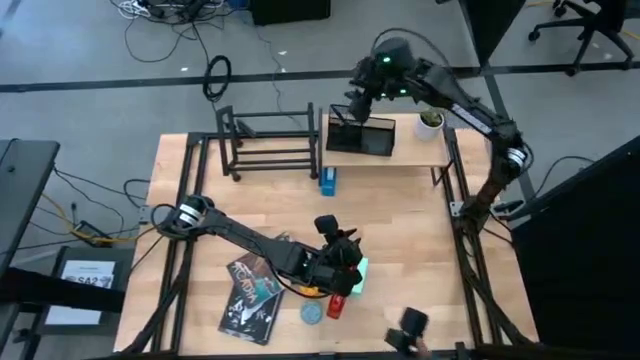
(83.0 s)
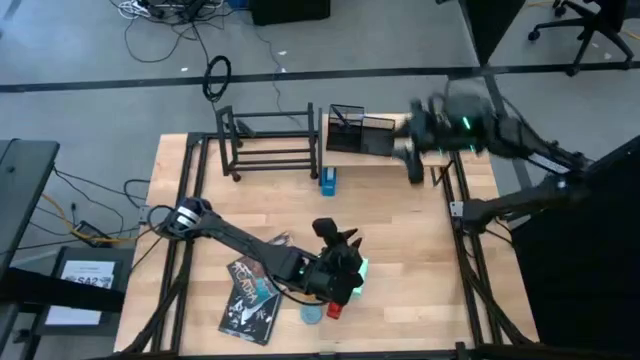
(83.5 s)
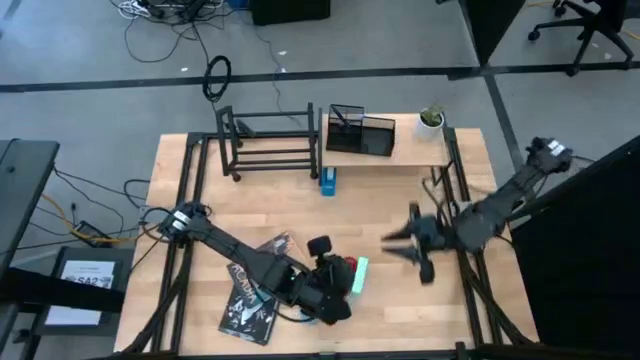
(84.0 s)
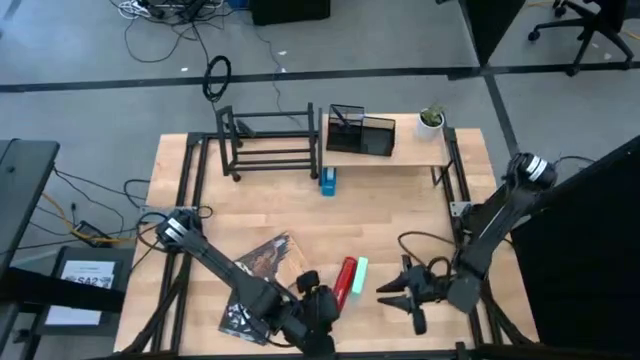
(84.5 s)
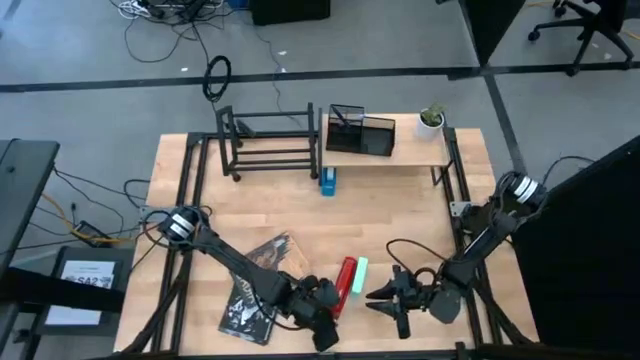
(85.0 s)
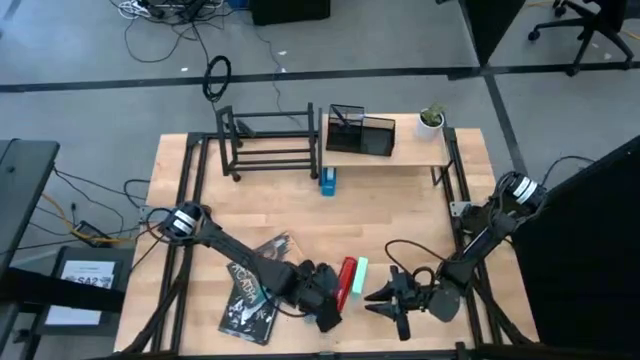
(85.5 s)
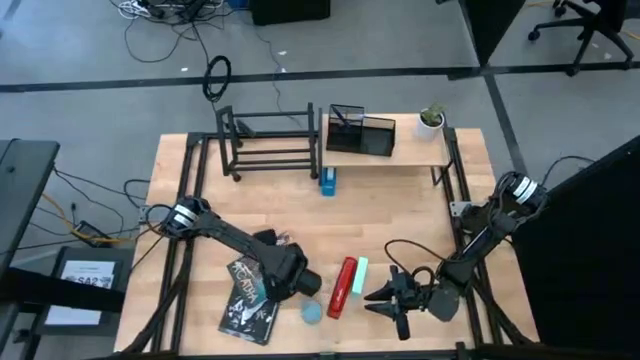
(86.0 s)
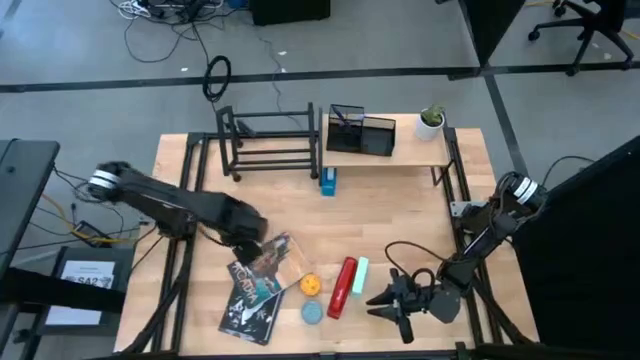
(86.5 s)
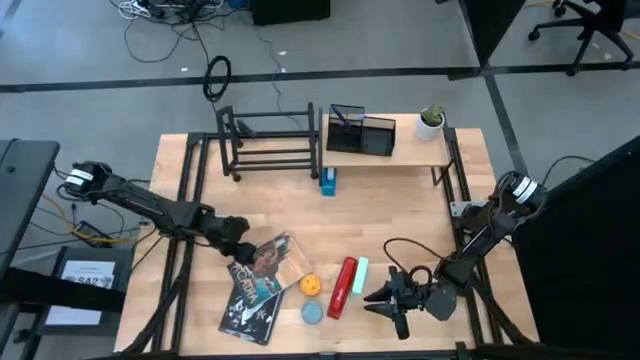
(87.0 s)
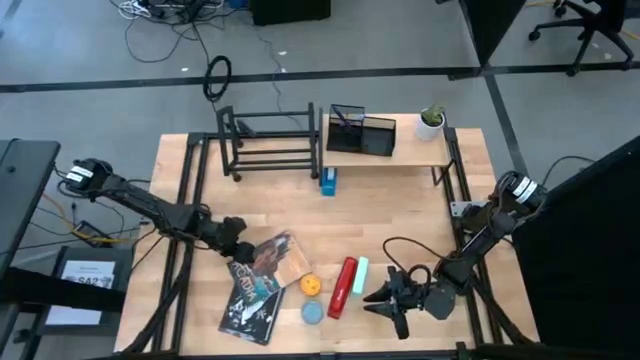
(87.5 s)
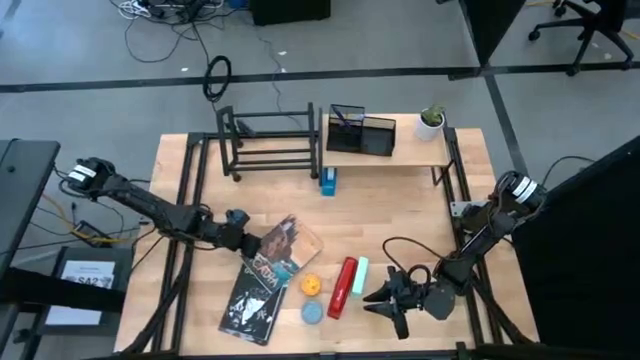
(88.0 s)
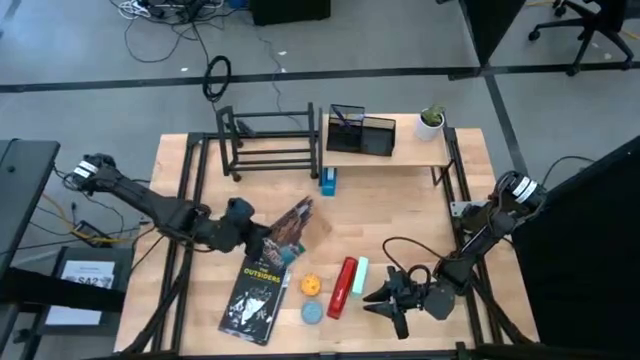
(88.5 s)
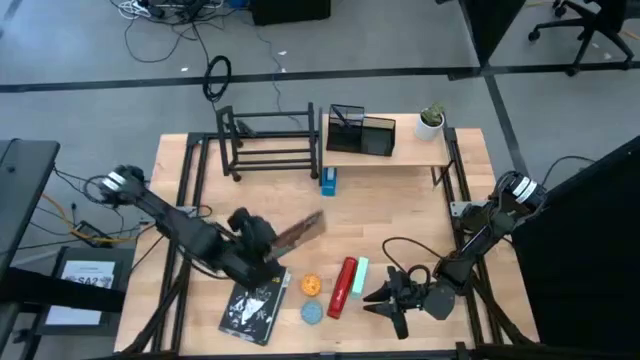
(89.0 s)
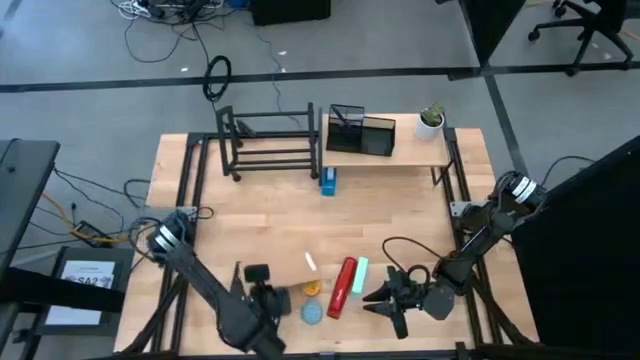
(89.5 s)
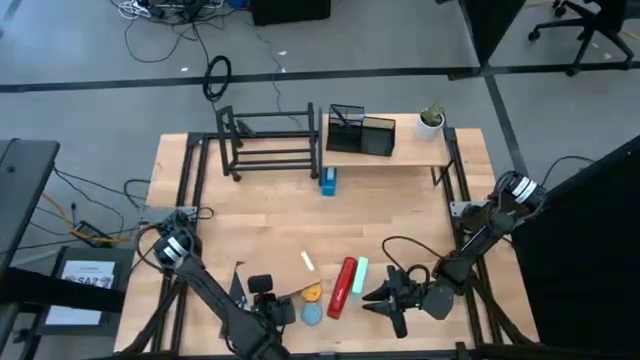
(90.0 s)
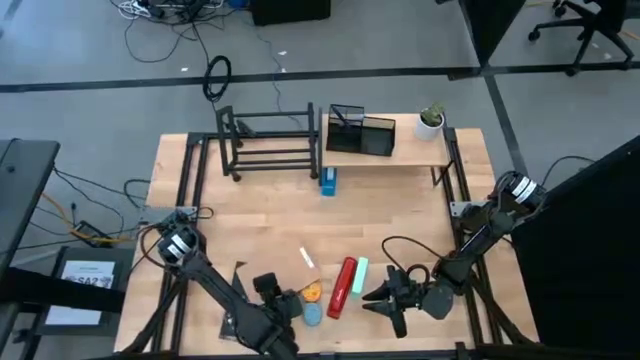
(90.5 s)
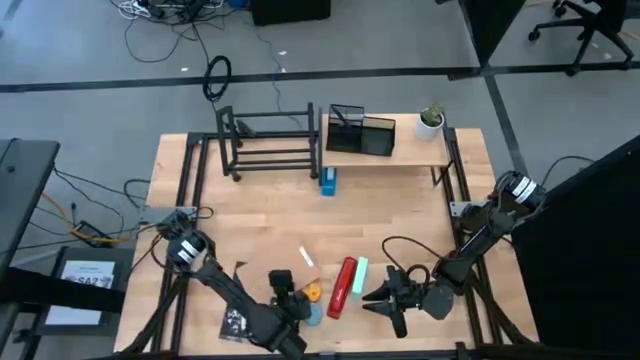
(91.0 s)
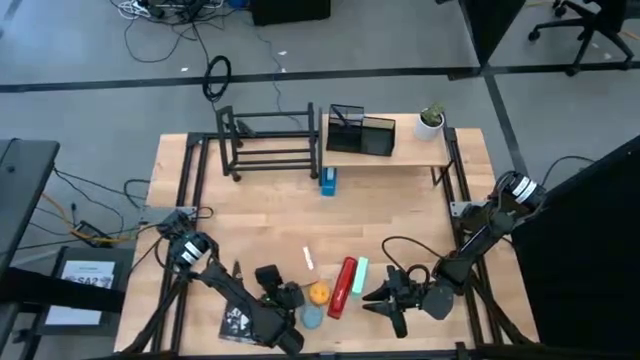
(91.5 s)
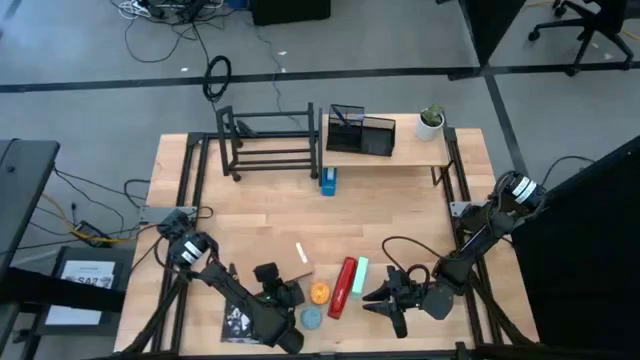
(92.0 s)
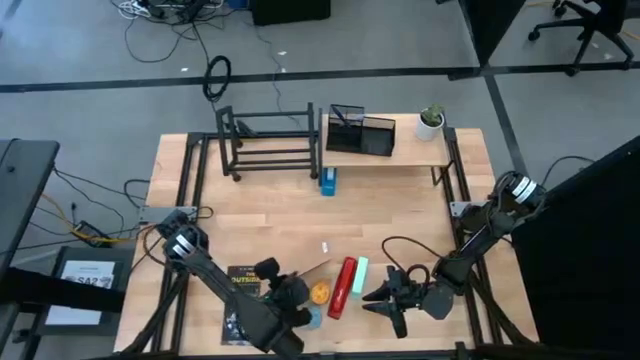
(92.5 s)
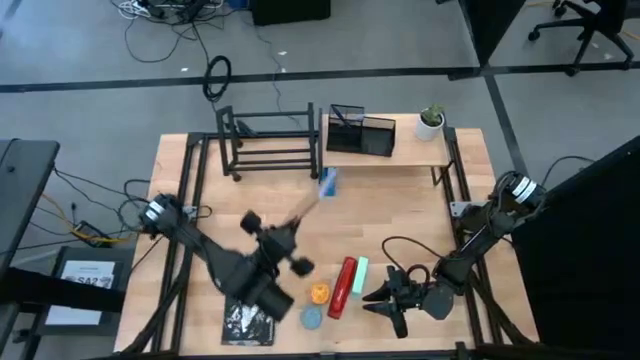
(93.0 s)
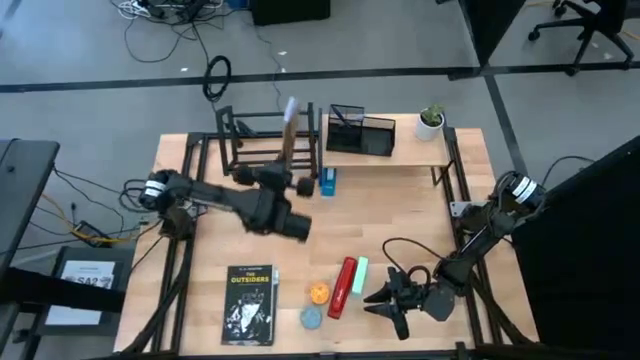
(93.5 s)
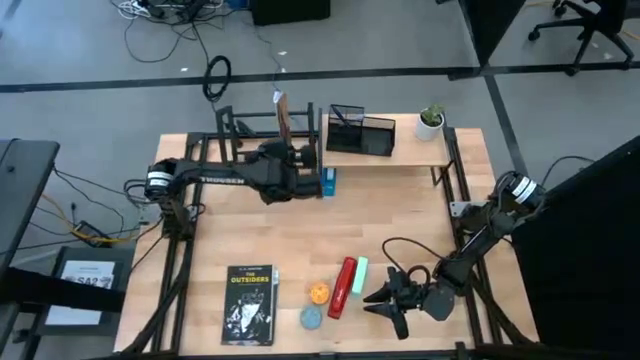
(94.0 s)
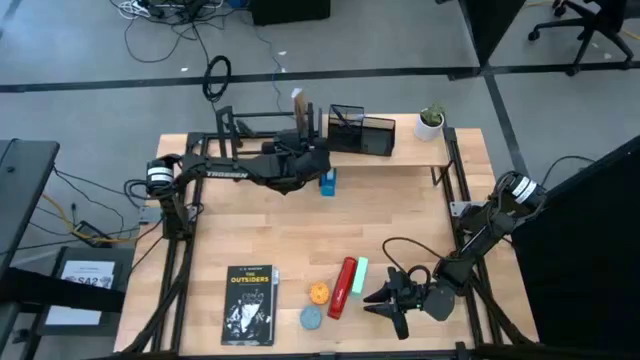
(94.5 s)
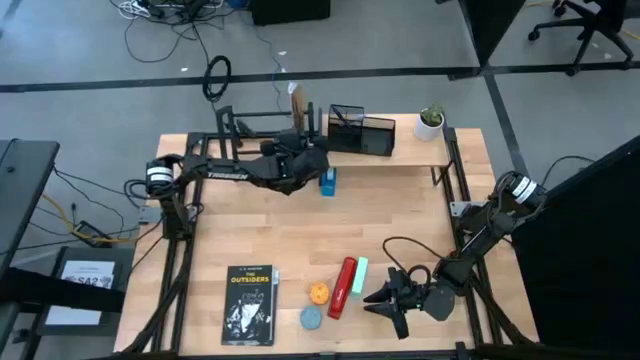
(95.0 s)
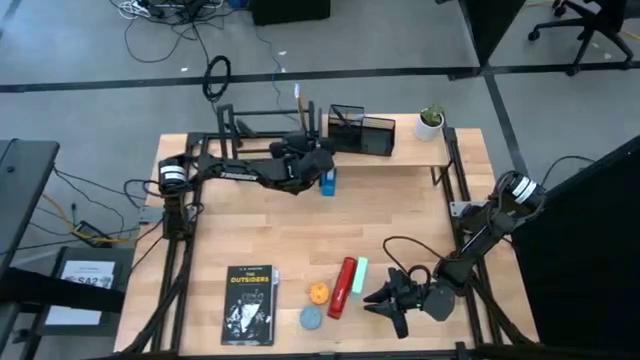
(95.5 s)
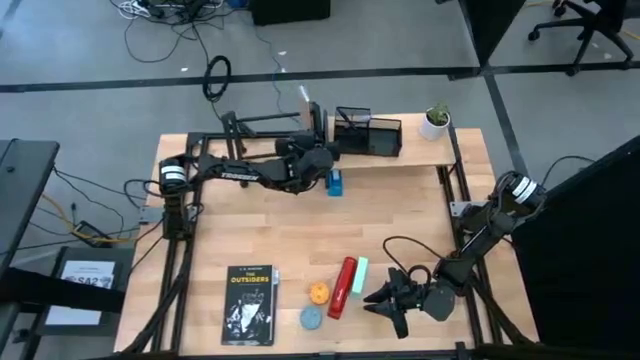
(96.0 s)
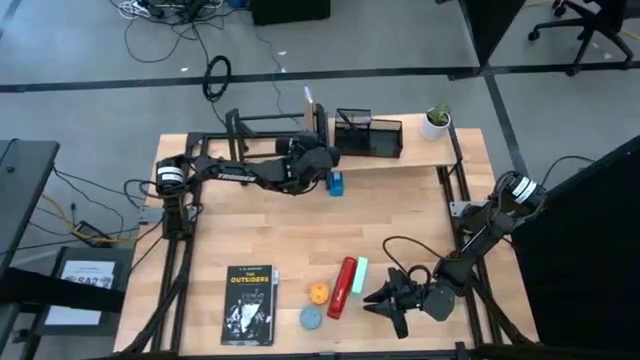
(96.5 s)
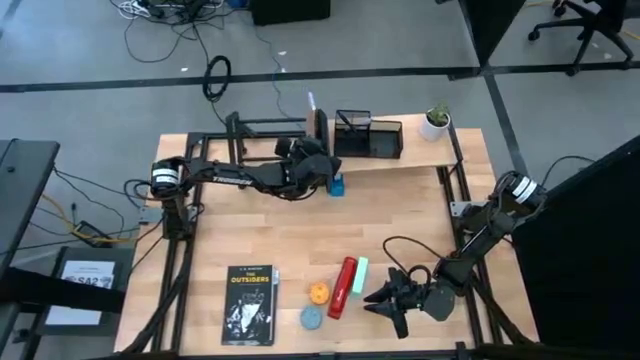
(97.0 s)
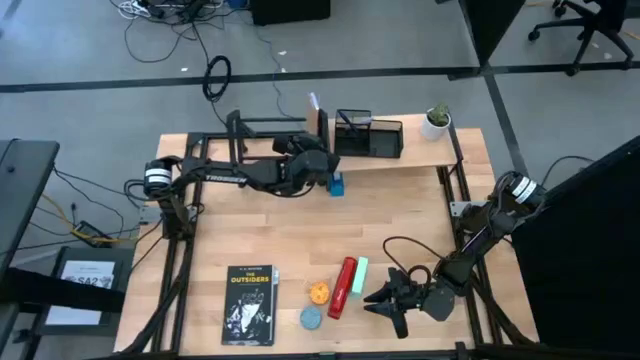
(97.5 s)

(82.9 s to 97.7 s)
Task: Stock shelves
Put the brown book on the book shelf

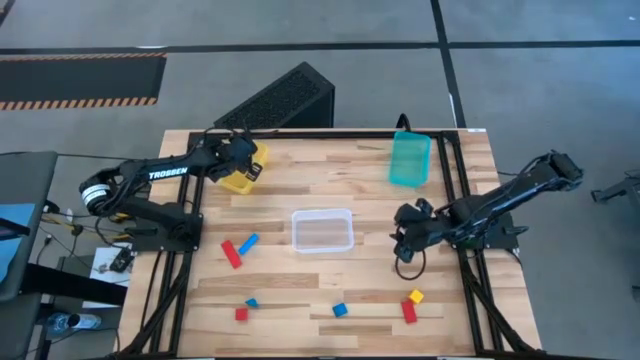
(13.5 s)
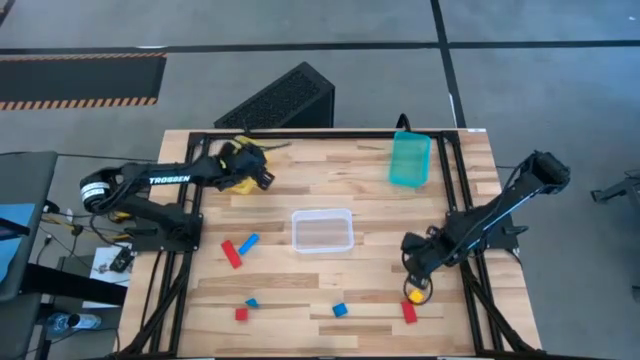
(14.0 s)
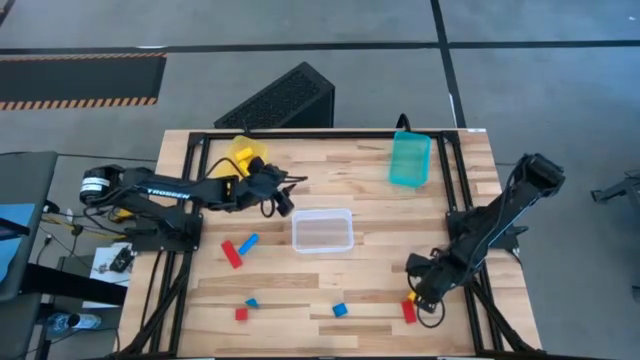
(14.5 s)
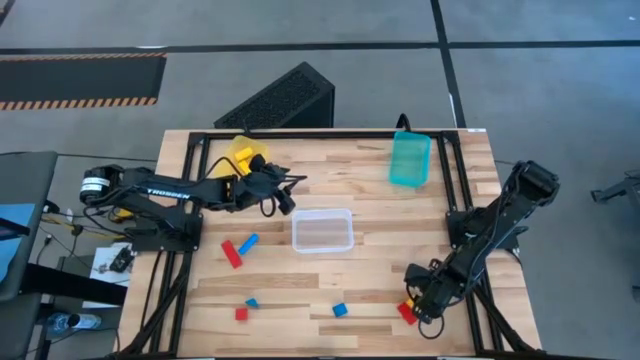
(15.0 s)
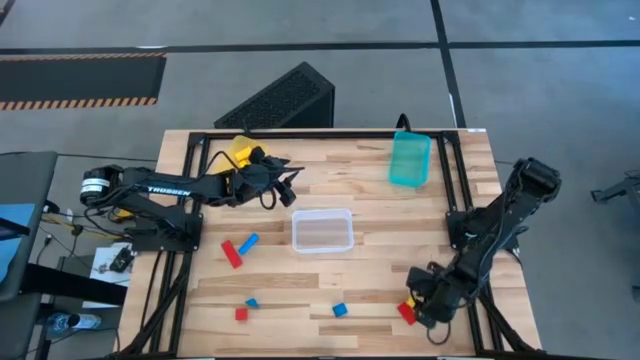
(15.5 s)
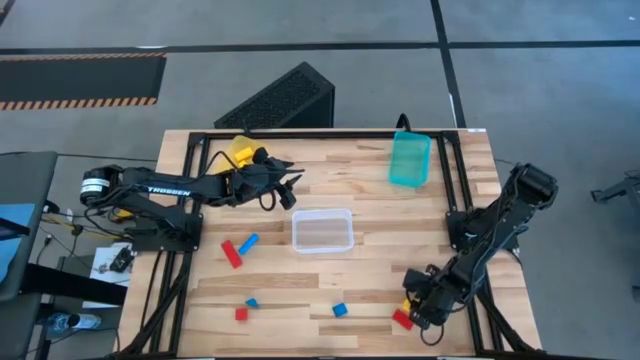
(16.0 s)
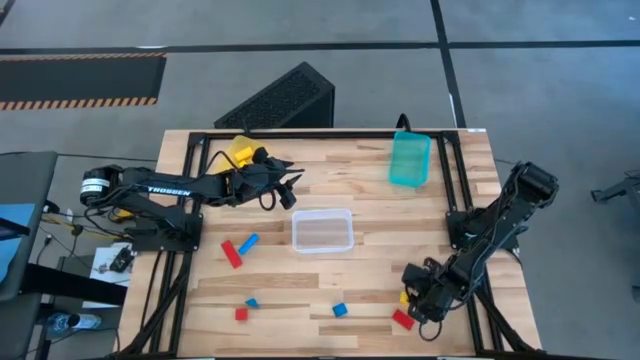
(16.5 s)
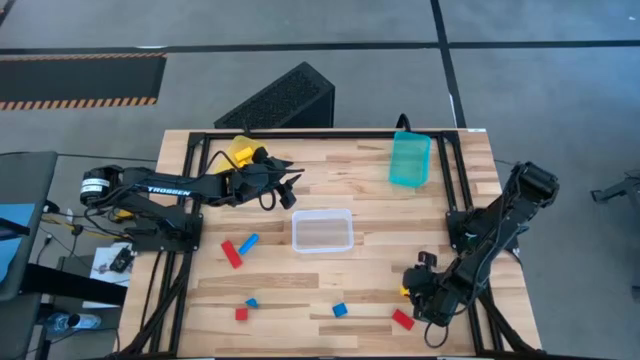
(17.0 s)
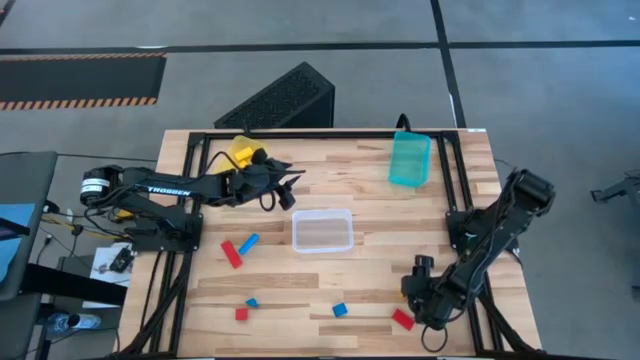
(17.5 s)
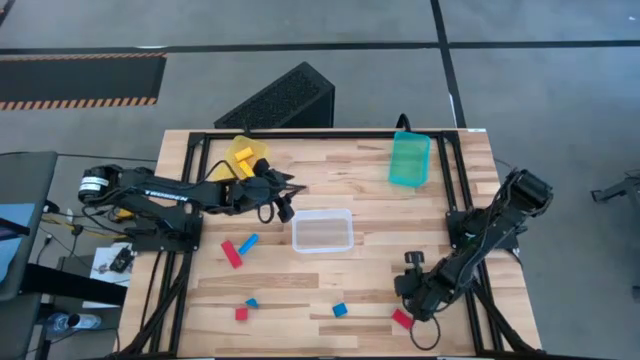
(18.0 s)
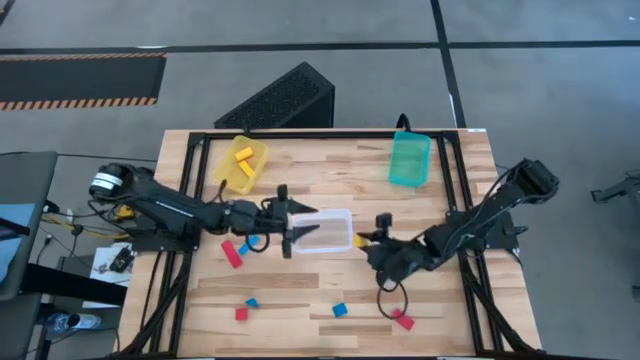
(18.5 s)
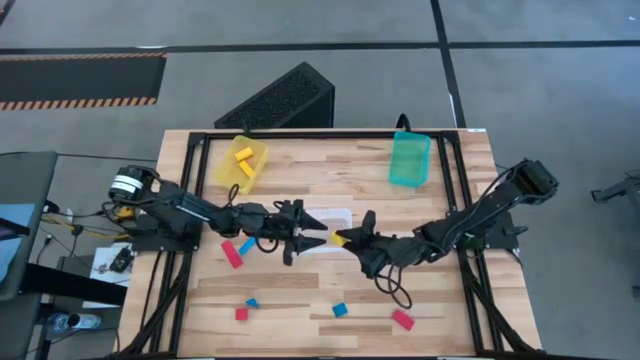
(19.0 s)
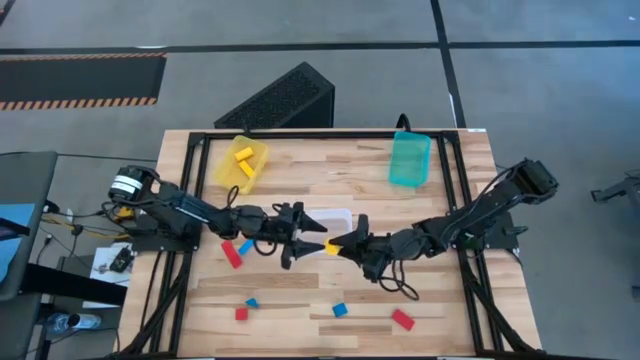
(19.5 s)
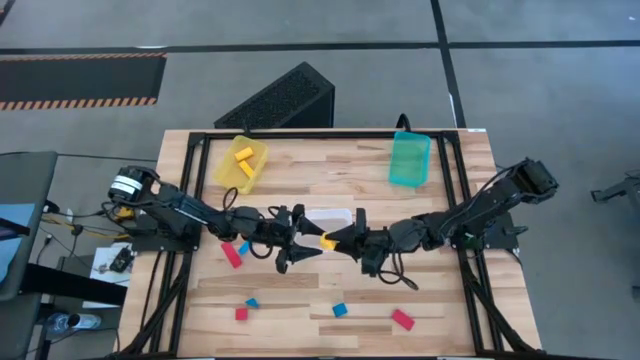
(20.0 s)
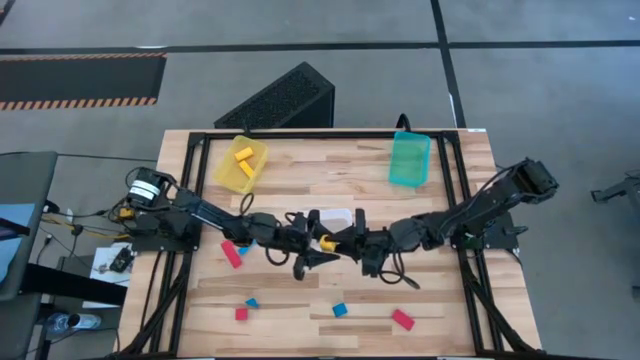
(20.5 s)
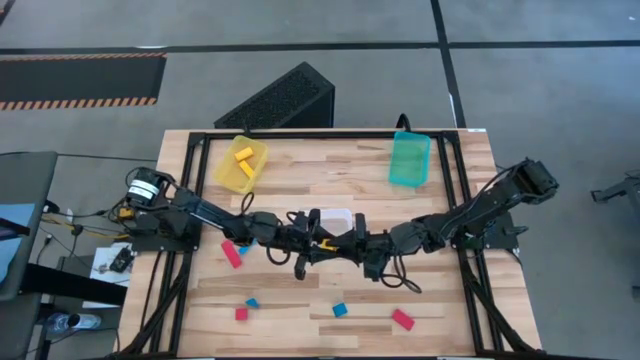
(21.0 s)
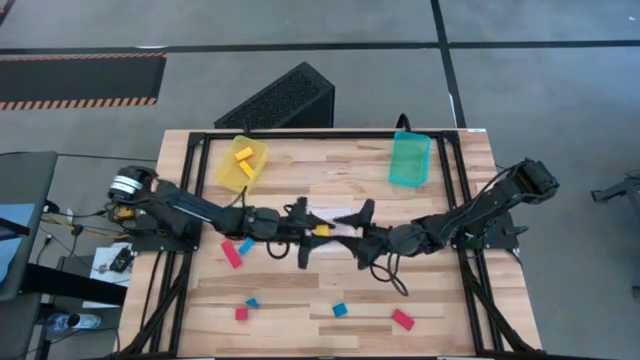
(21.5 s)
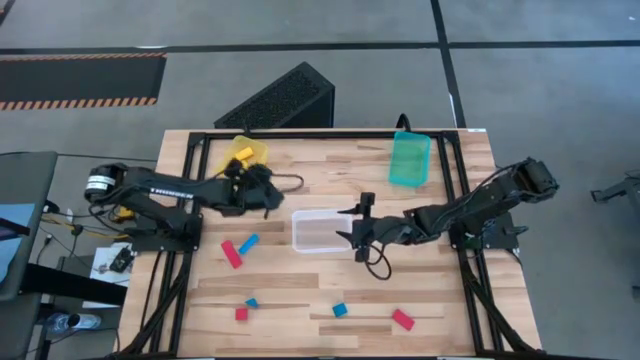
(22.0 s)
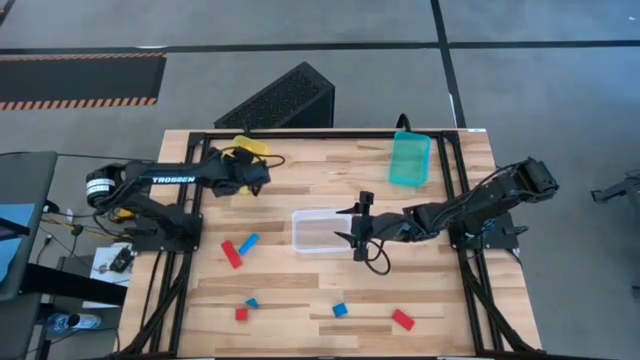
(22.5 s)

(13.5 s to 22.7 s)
Task: Sort & place blocks by color
Put the yellow block into the yellow bin
